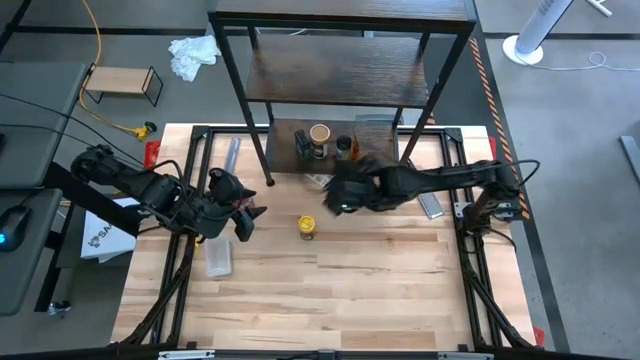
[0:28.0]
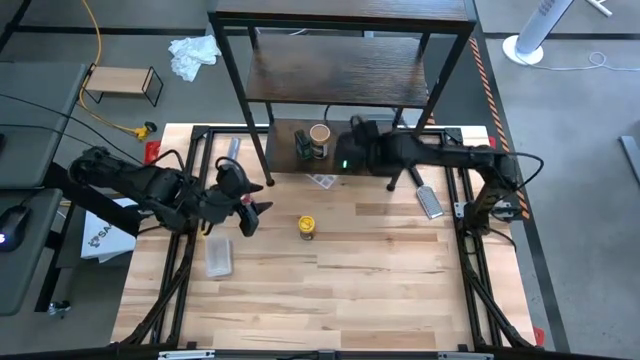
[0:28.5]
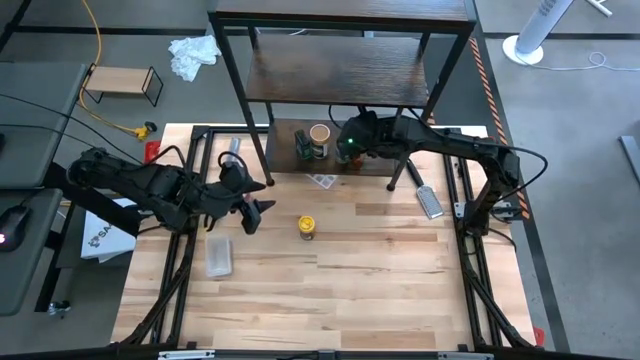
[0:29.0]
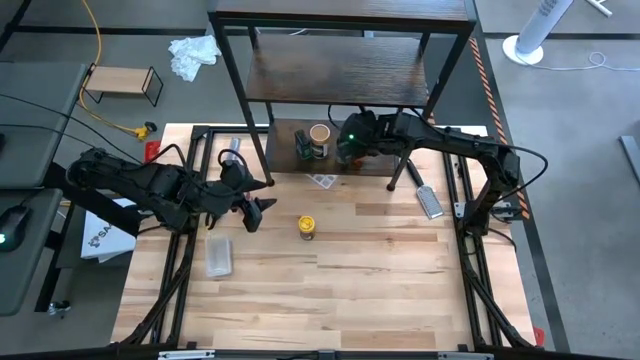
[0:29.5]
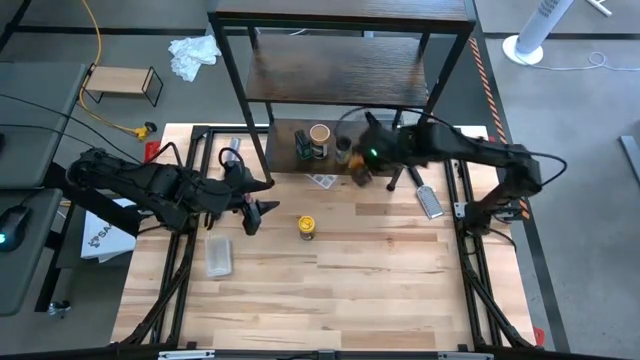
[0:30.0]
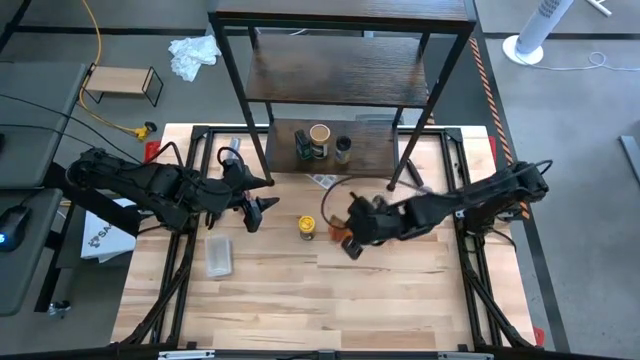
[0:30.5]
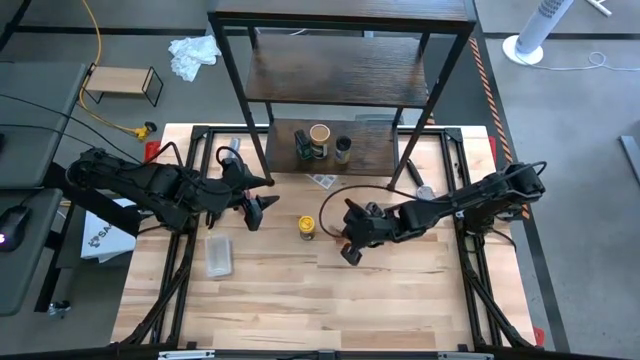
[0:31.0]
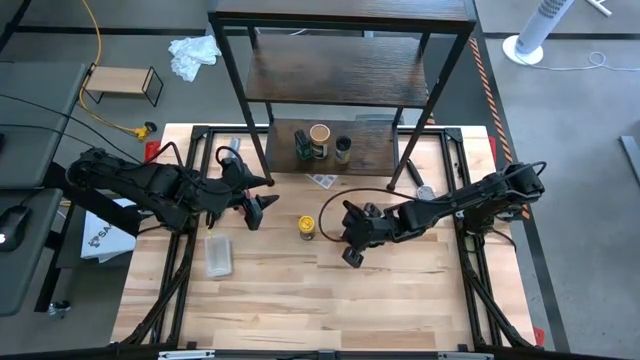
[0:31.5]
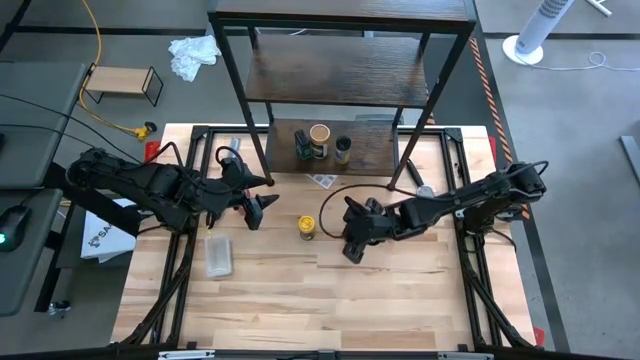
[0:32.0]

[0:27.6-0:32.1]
Task: Shelf spices
Remove the seasoning bag from the bottom shelf

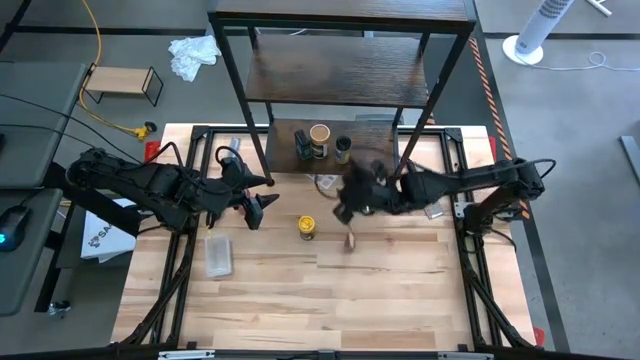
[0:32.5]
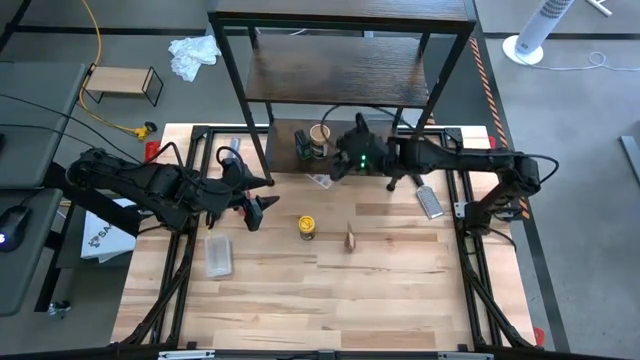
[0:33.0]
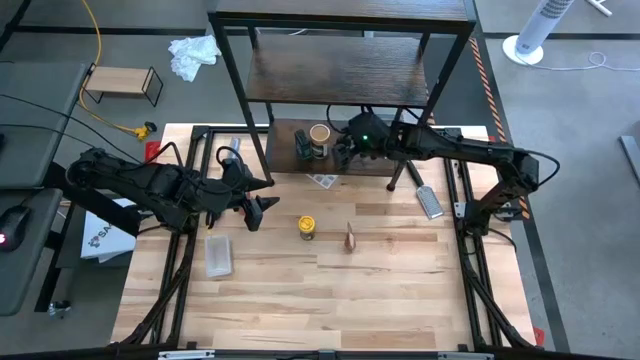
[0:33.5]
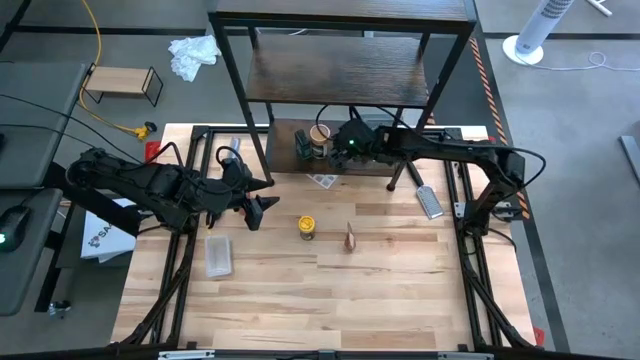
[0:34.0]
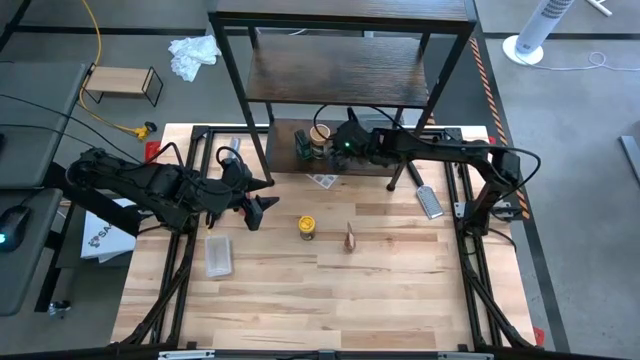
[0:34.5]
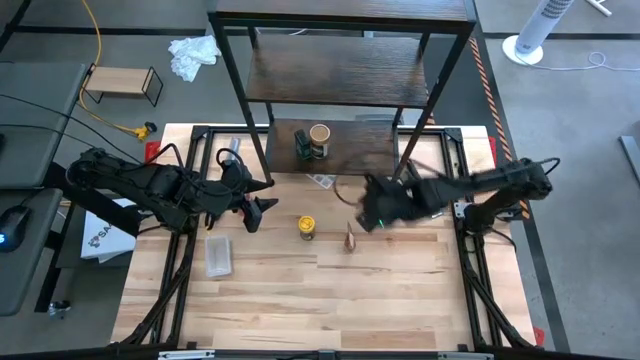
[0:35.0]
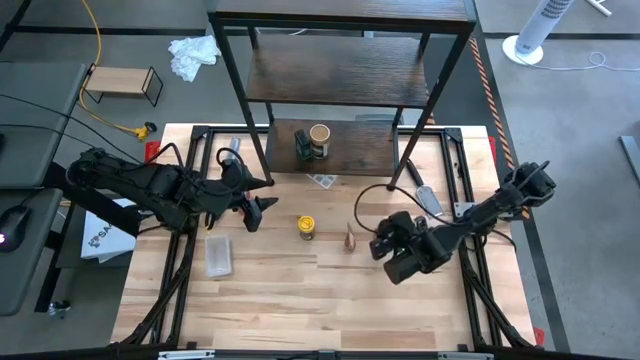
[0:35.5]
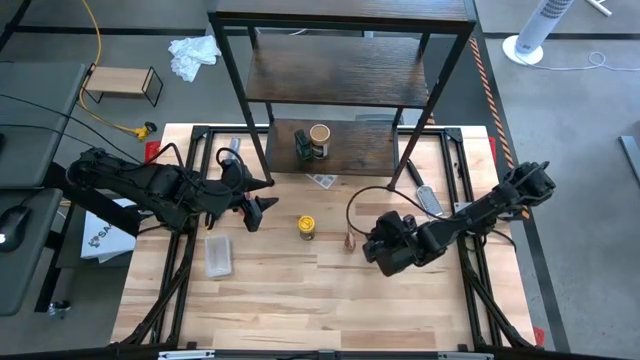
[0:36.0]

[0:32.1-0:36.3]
Remove the black seasoning bottle from the bottom shelf

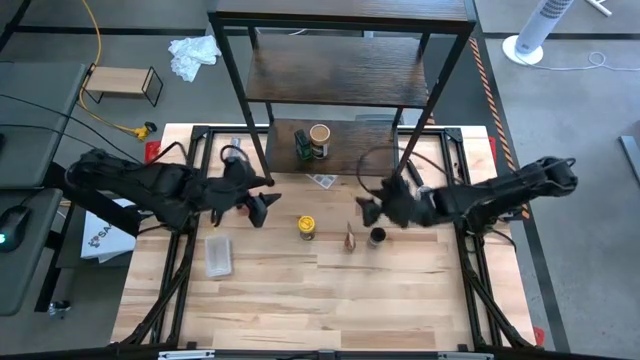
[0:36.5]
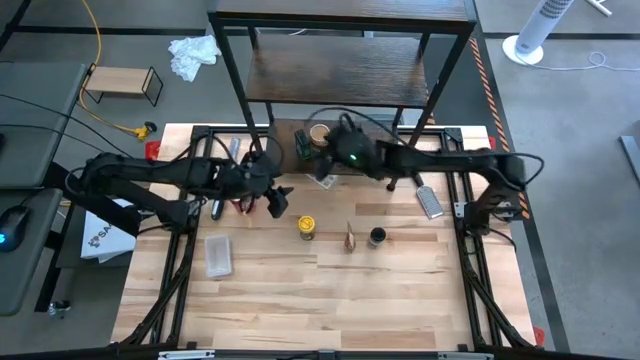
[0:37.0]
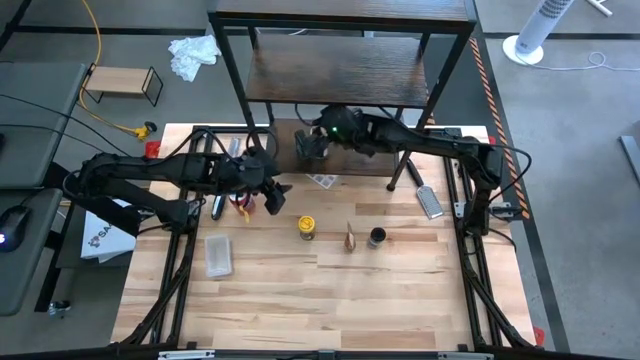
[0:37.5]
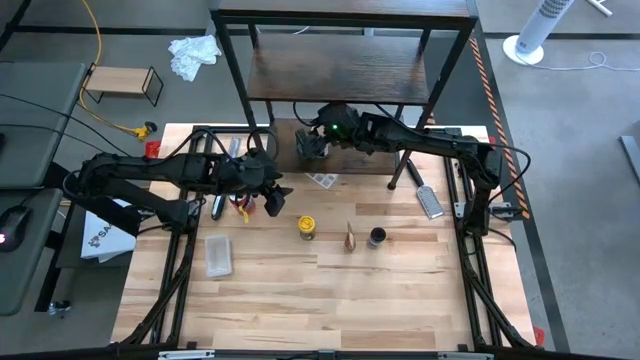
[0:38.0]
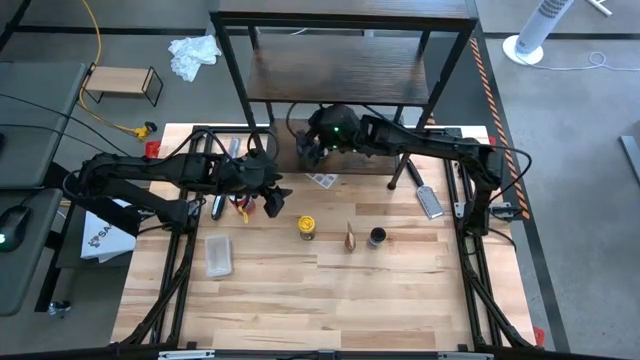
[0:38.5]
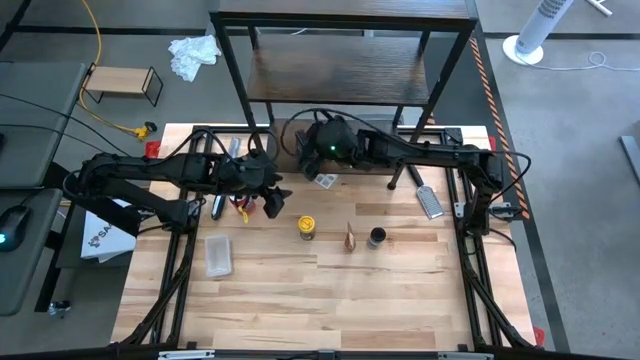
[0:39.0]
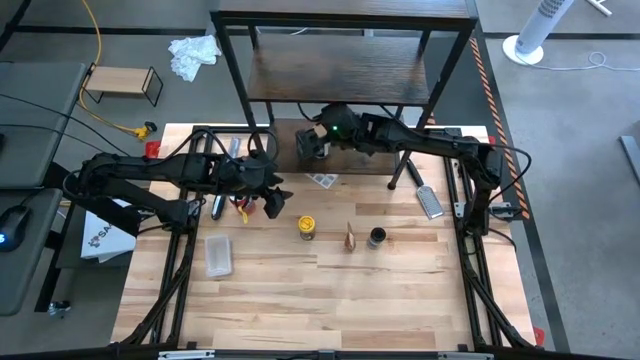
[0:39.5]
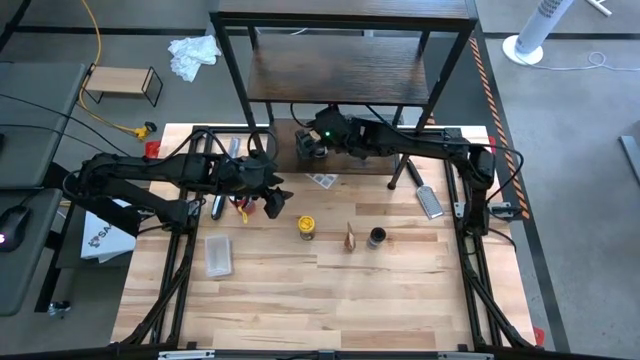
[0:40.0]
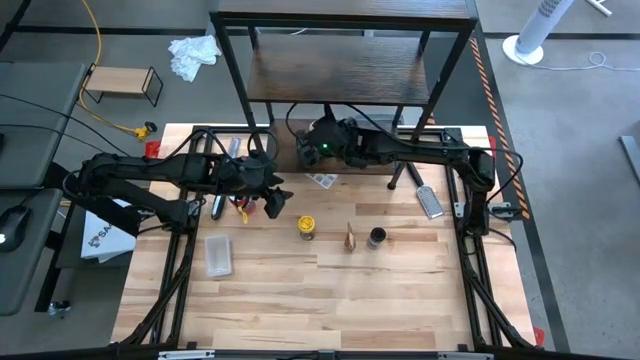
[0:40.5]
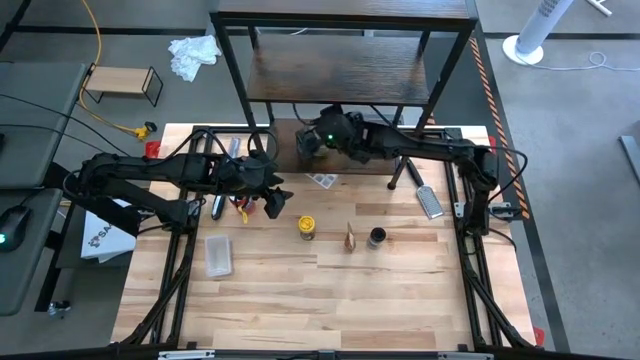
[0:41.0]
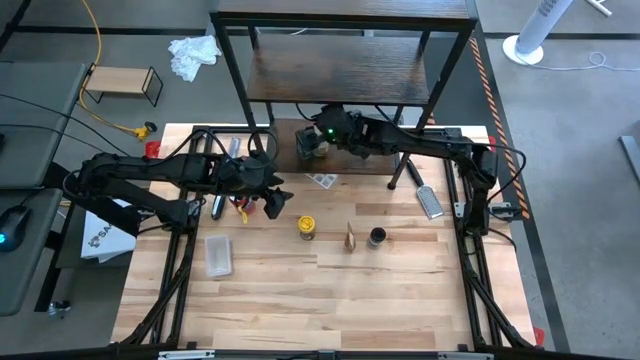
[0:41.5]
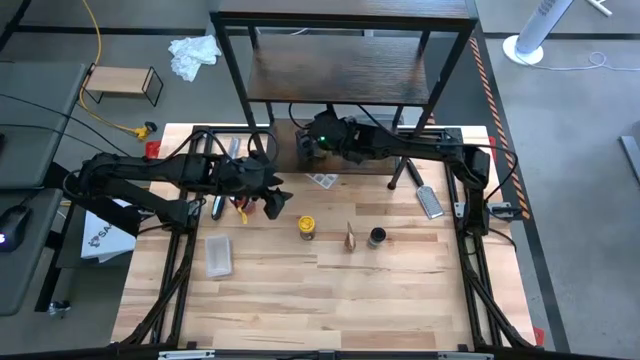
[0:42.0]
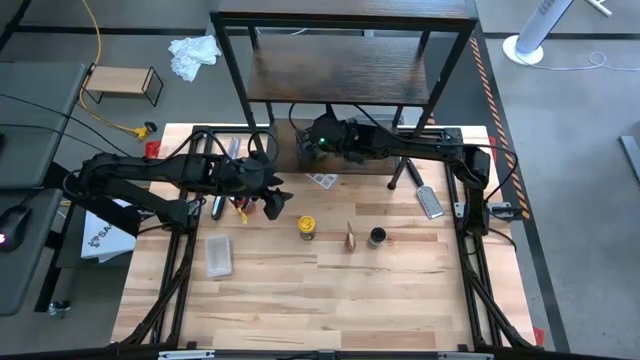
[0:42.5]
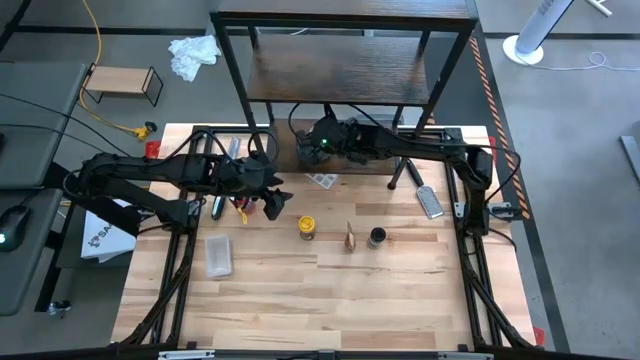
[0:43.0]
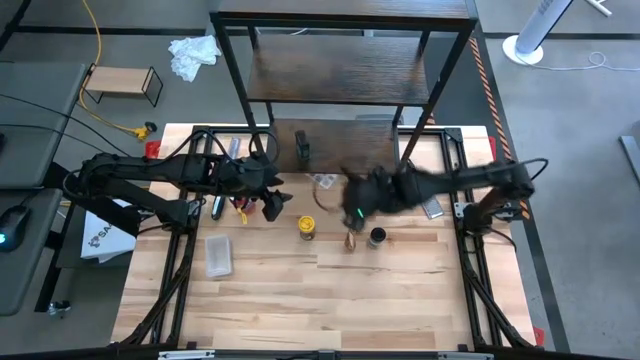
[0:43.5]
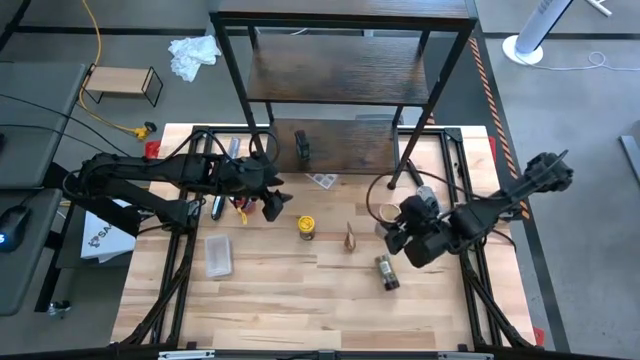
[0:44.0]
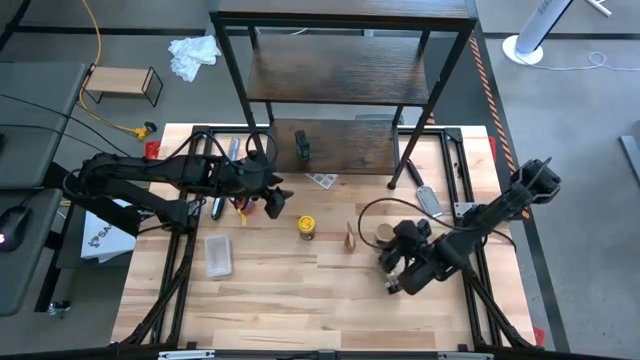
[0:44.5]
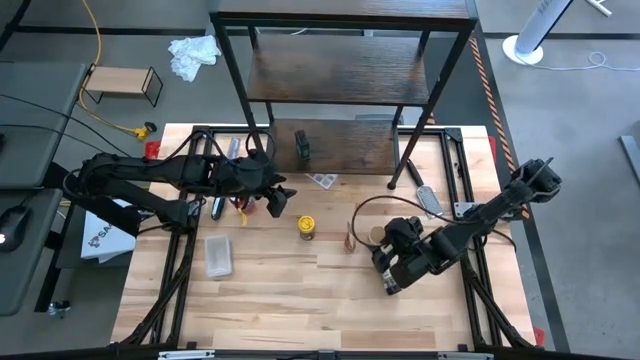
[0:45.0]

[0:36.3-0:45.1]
Remove the brown seasoning bottle from the bottom shelf

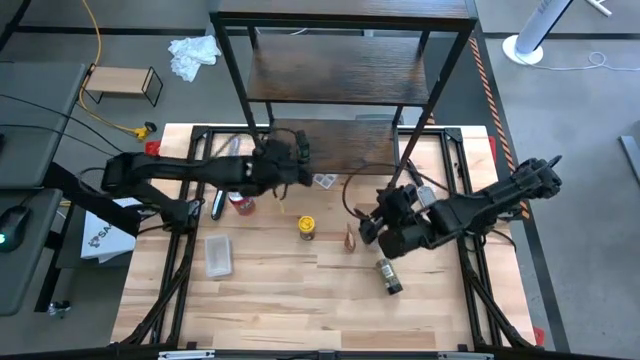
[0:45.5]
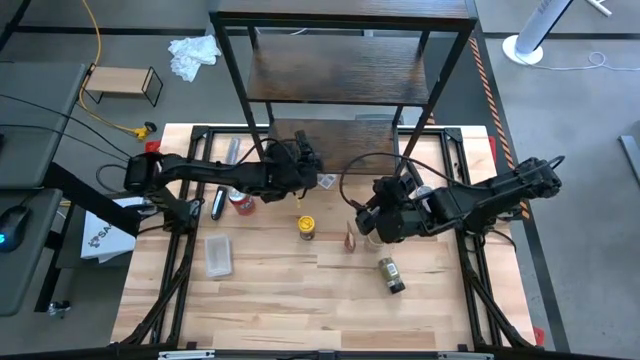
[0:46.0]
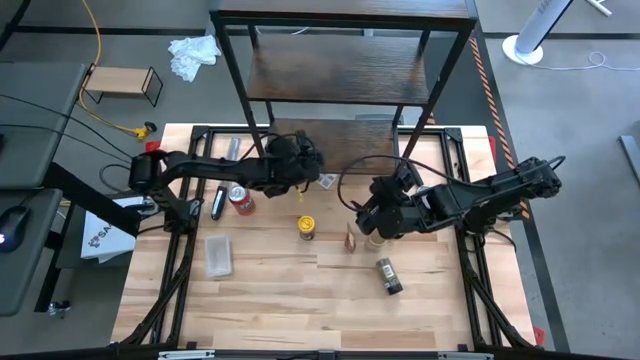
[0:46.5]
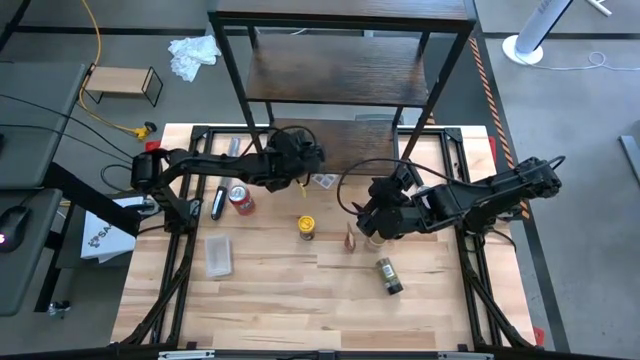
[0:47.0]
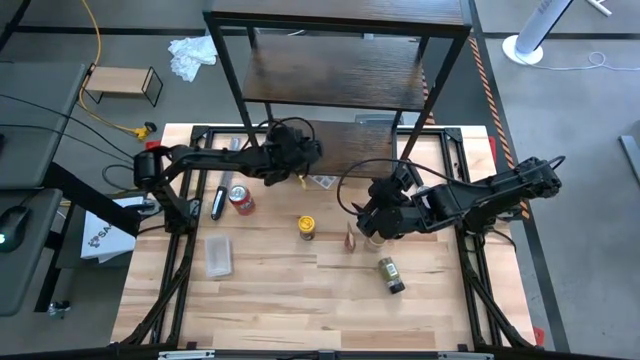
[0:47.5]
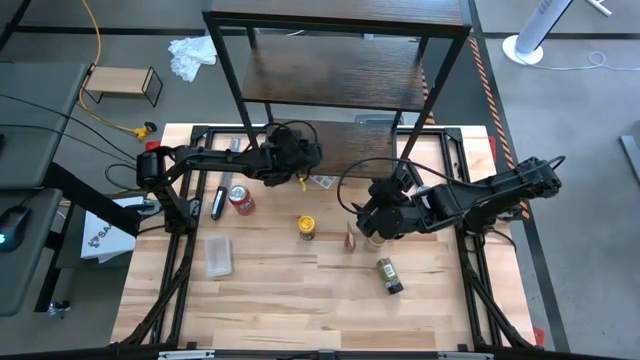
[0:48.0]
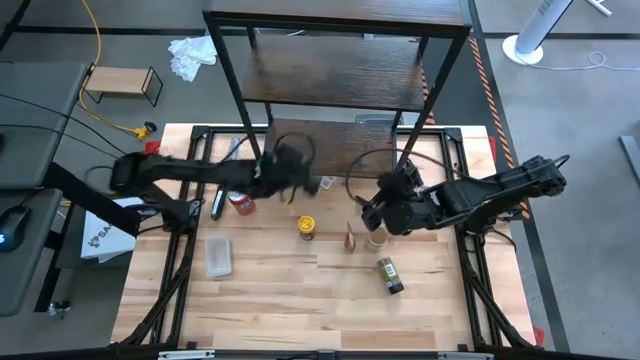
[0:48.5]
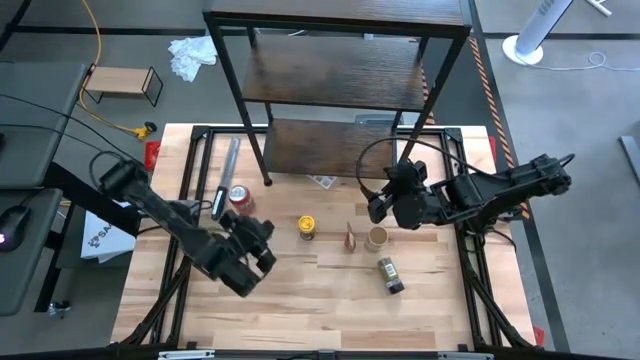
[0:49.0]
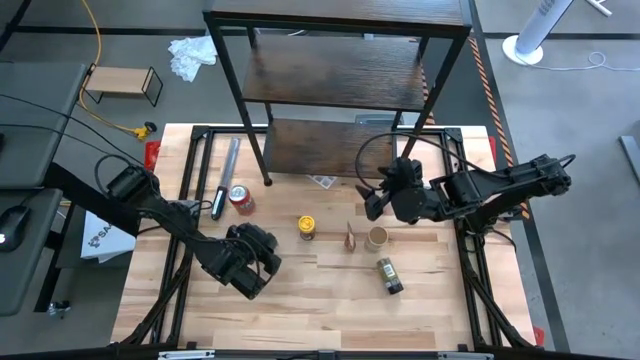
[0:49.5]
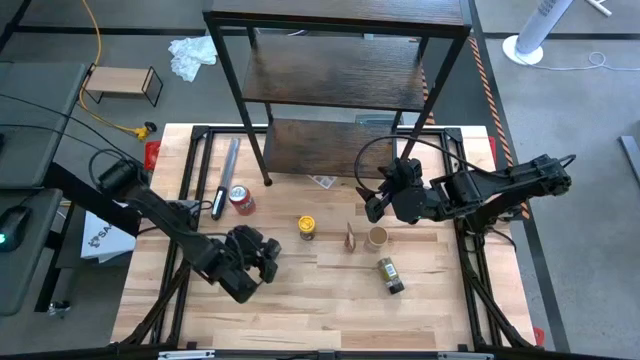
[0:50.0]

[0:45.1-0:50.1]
Remove the black seasoning box from the bottom shelf
